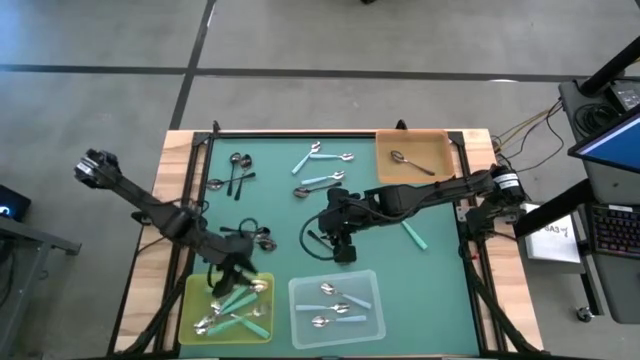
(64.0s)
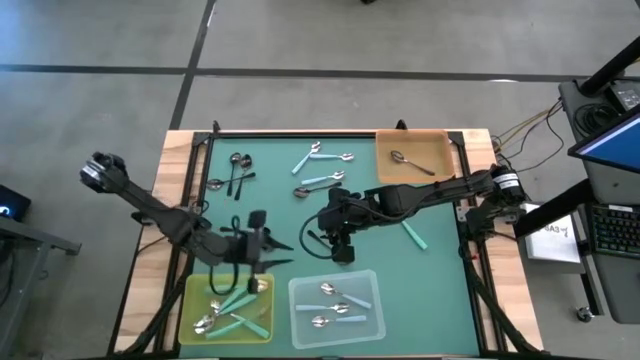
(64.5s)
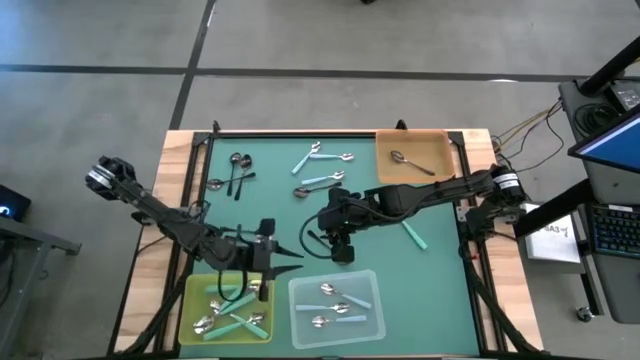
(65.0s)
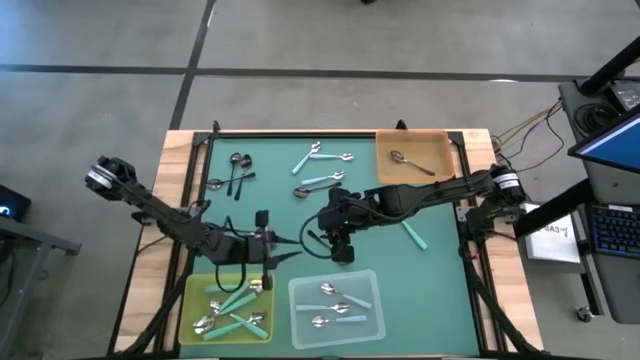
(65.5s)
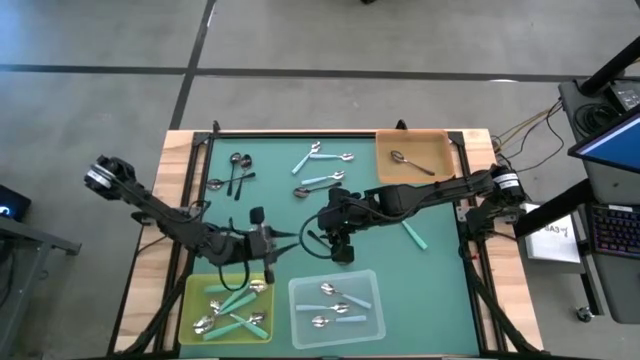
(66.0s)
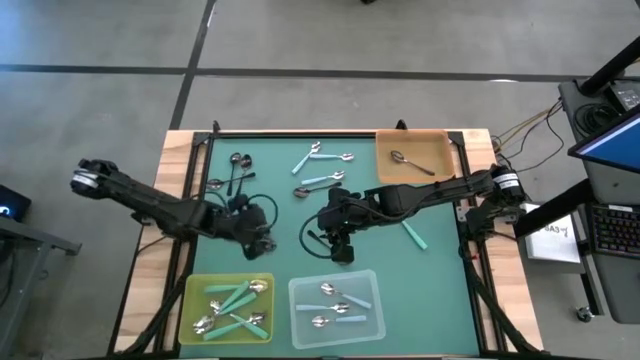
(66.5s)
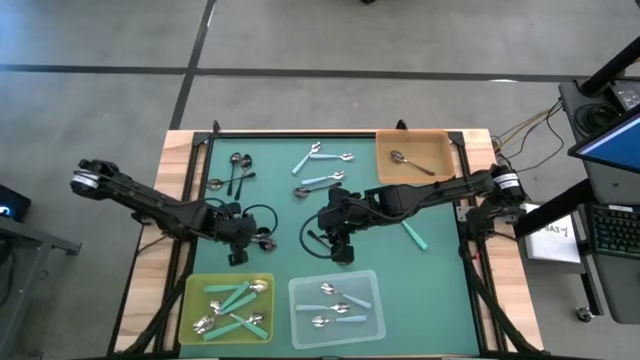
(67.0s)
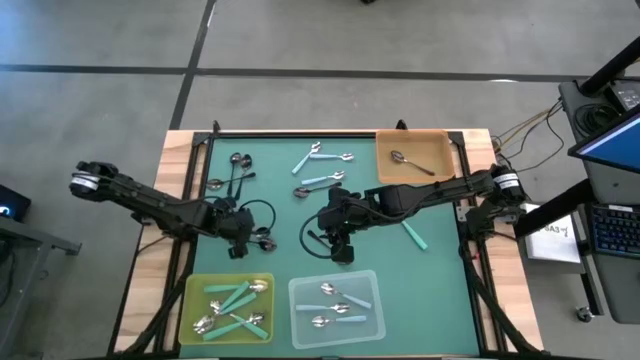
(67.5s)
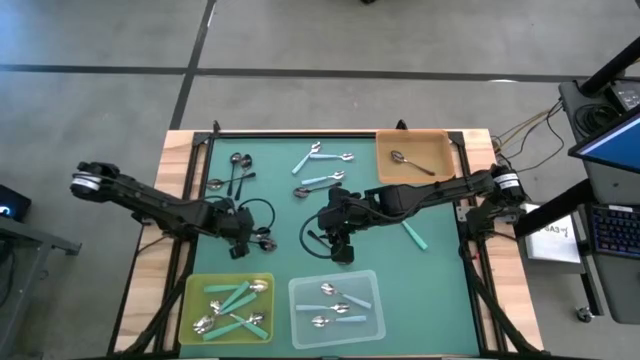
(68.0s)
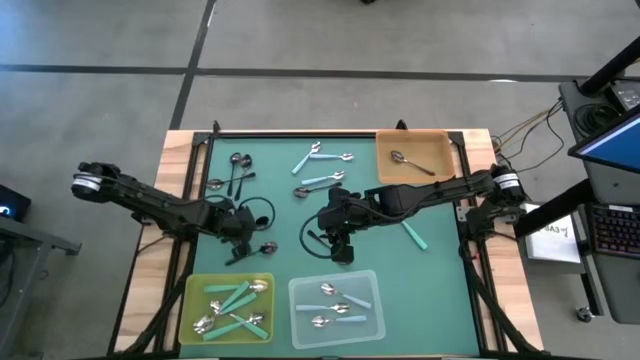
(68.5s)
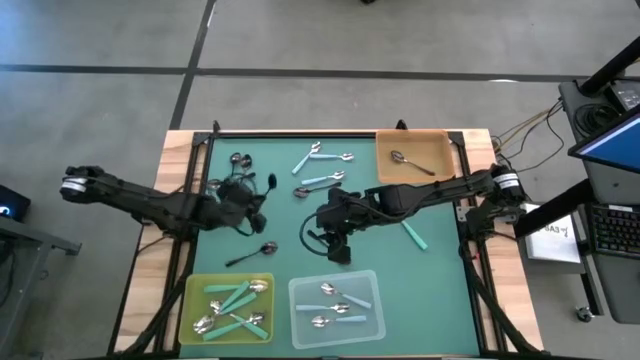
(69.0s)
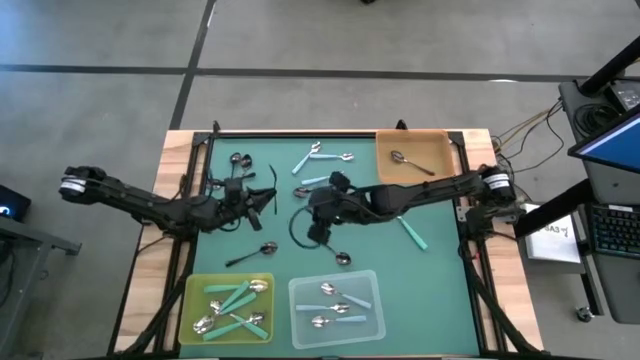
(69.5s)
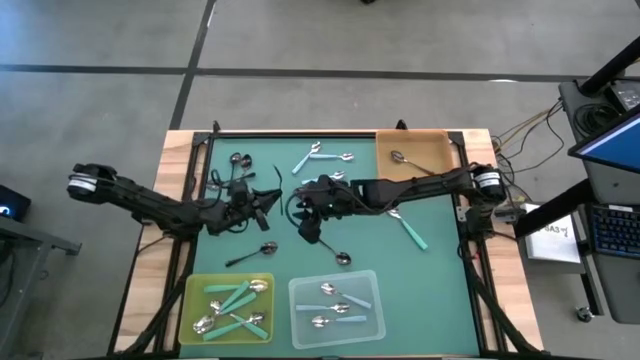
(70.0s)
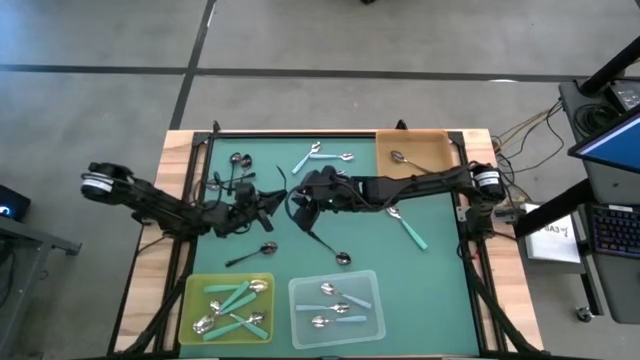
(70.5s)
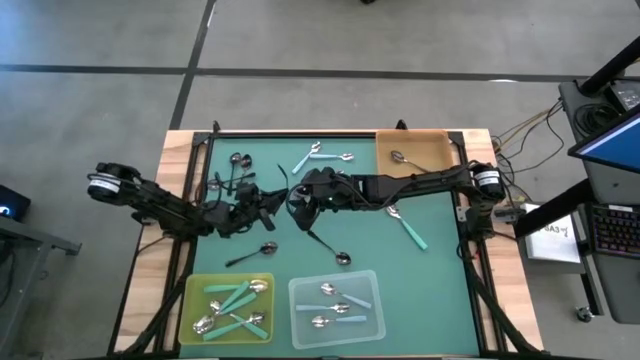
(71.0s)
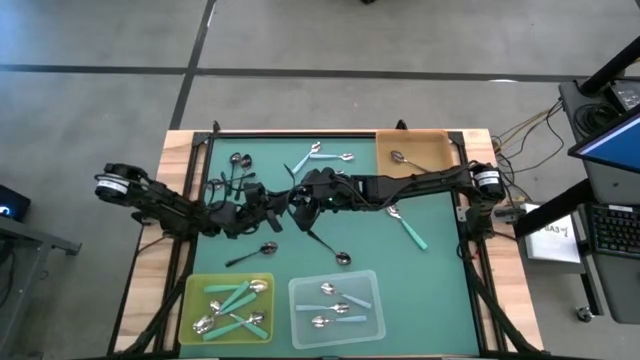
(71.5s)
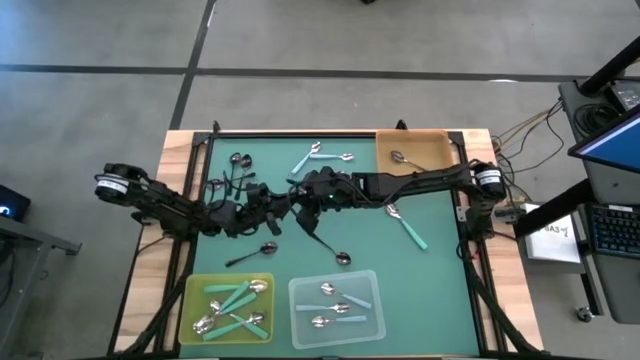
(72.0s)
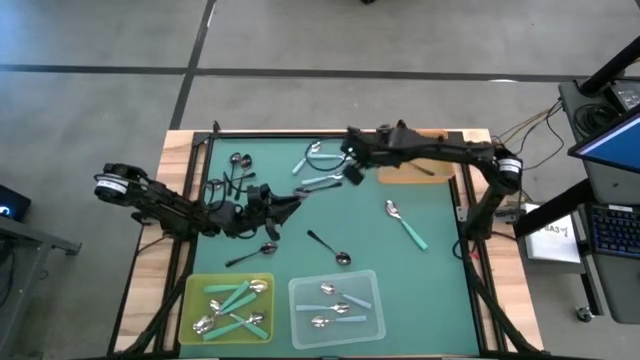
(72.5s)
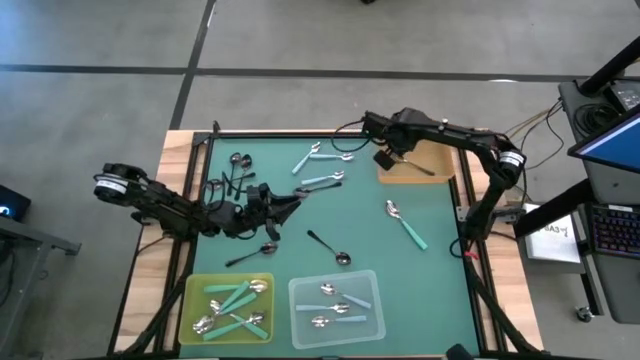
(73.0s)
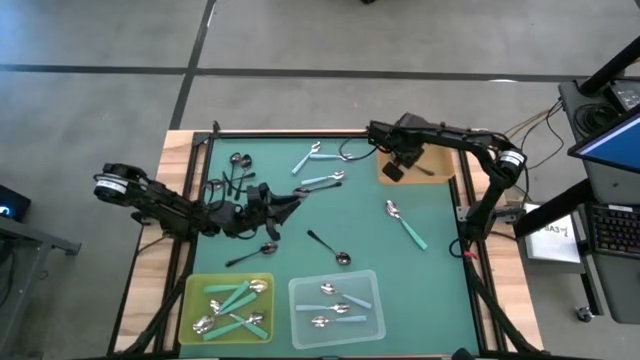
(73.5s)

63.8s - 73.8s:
Task: Sort silverware by color (type)
Put the black spoon into the orange bin

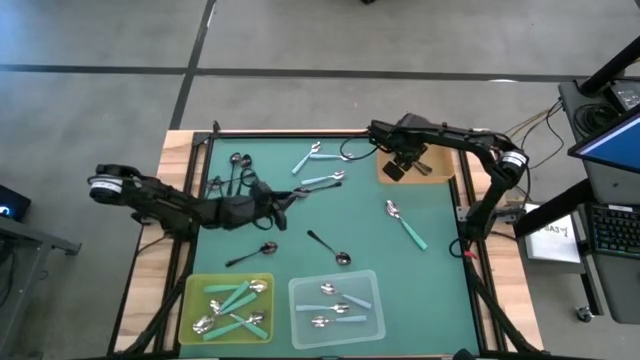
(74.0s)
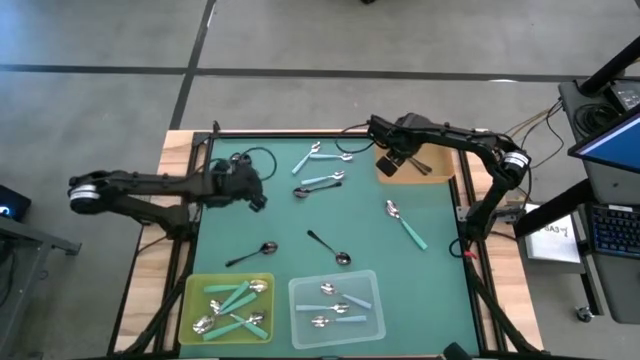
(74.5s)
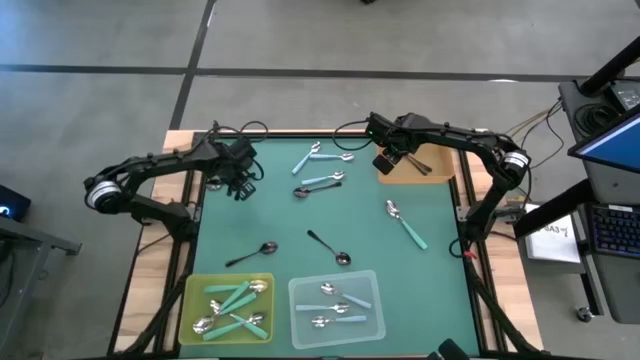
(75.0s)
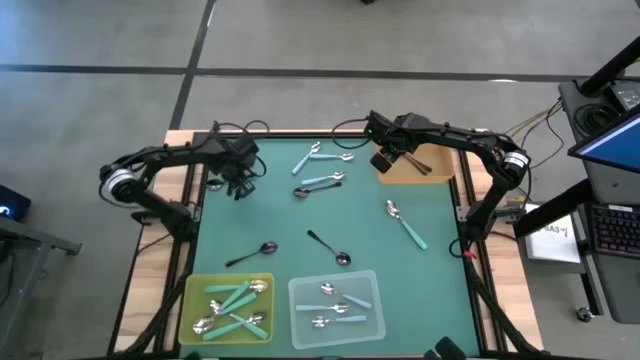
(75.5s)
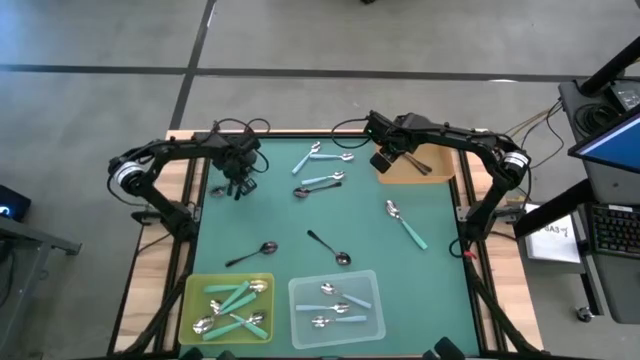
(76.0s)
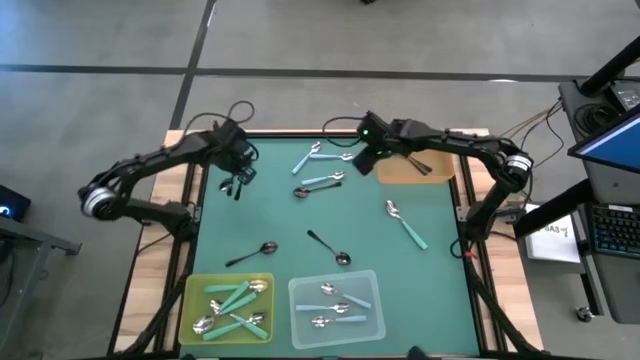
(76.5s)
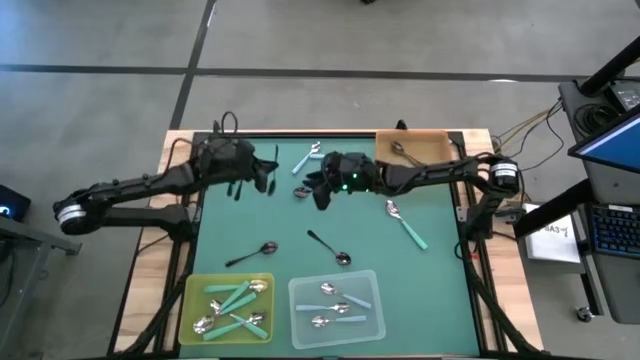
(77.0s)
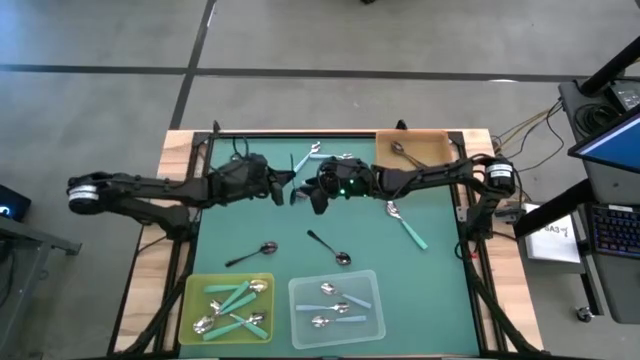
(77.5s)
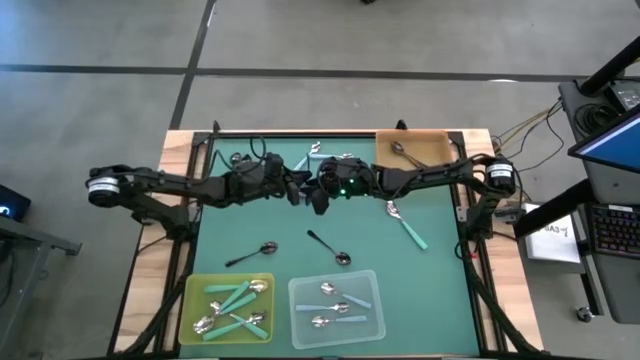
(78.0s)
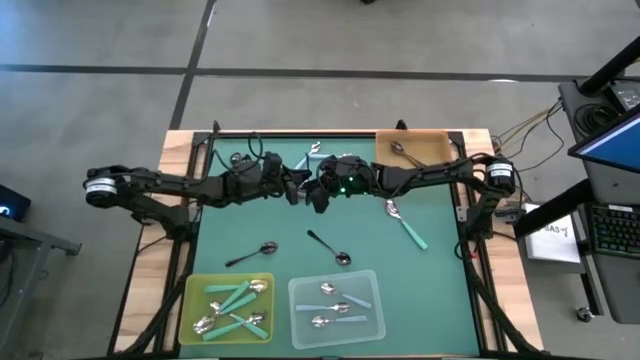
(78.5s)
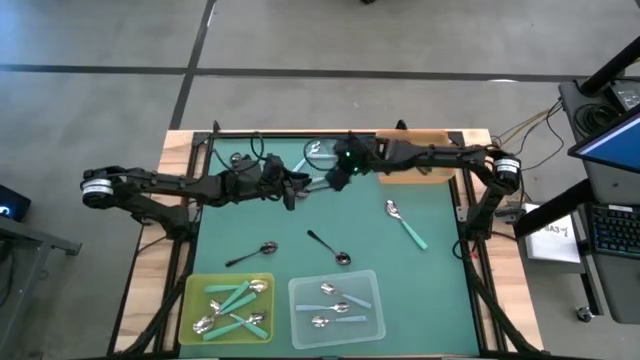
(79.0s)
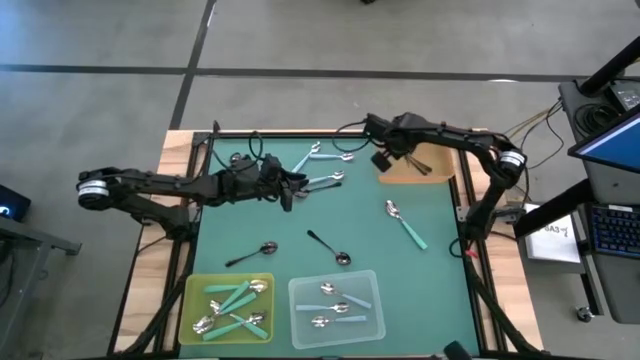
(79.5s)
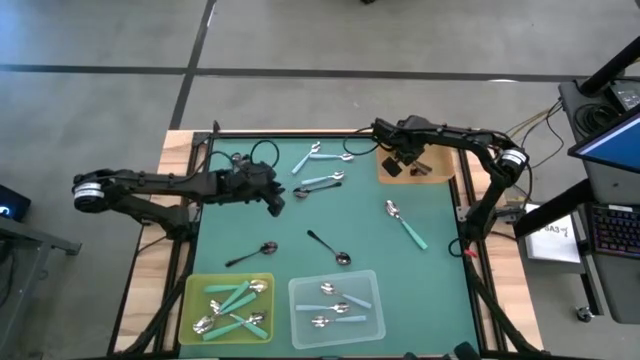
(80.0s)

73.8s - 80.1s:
Put the black spoon into the orange bin

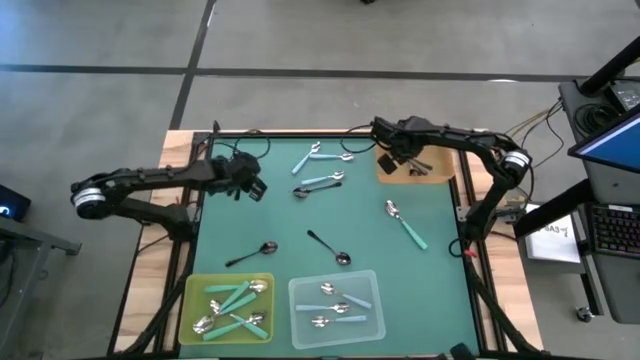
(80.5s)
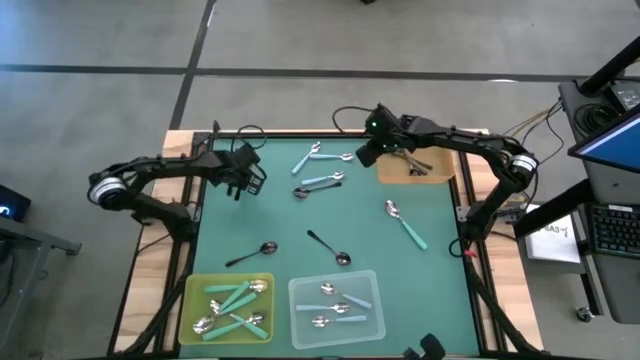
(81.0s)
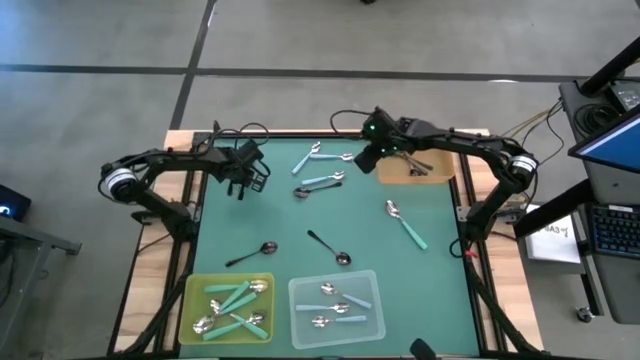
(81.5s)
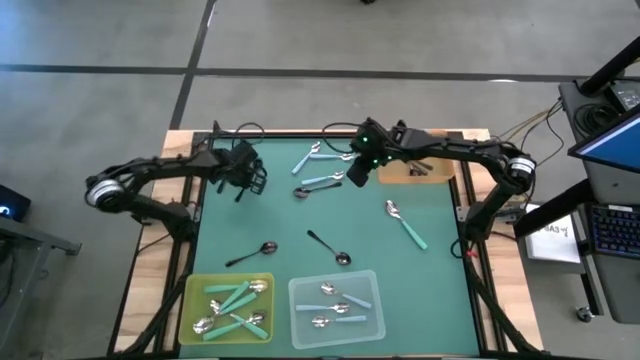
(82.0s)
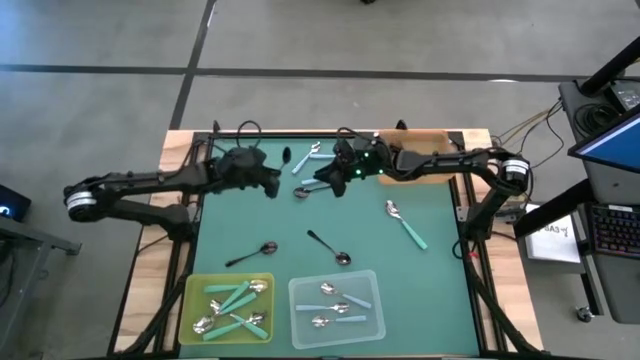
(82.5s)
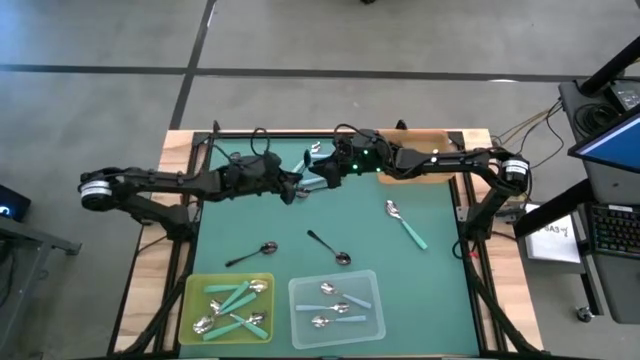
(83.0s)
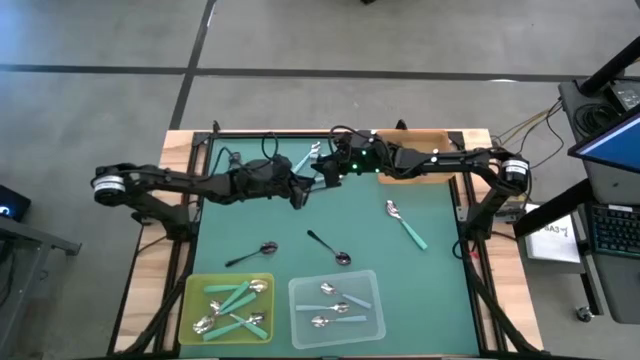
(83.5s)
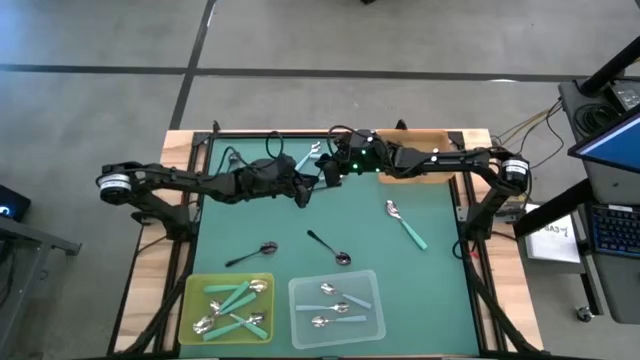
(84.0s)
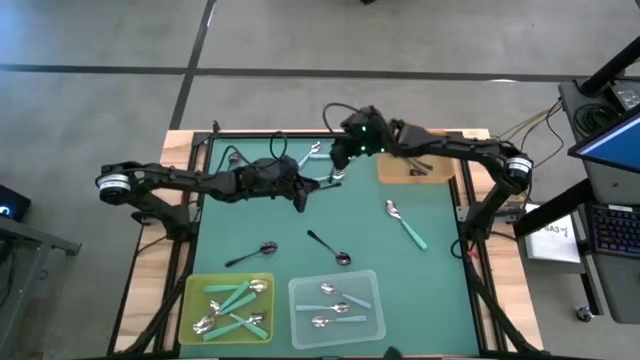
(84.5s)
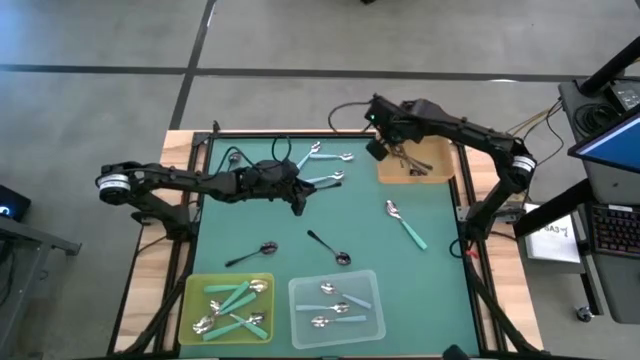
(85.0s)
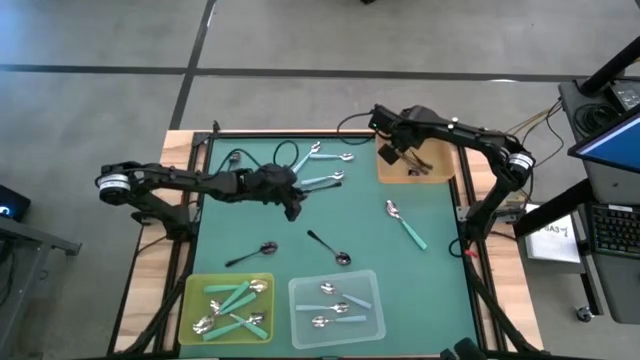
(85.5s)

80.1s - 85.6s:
Put the black spoon into the orange bin
